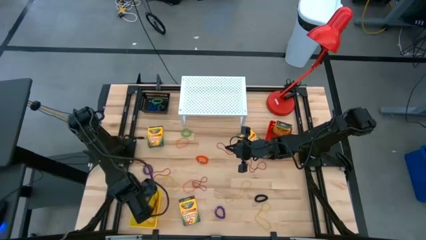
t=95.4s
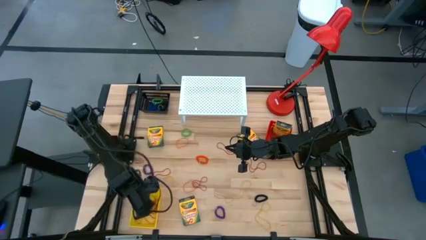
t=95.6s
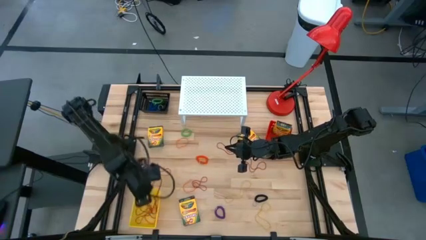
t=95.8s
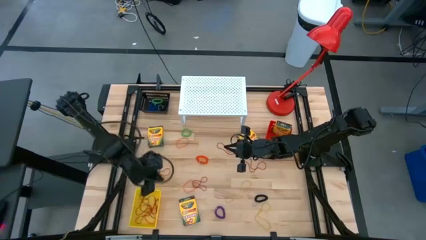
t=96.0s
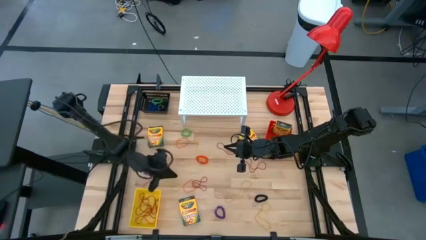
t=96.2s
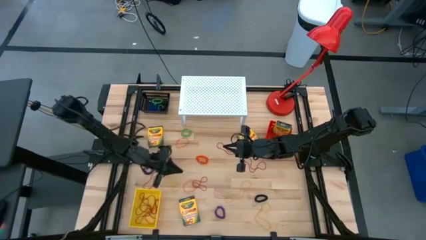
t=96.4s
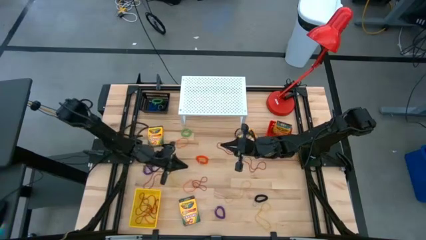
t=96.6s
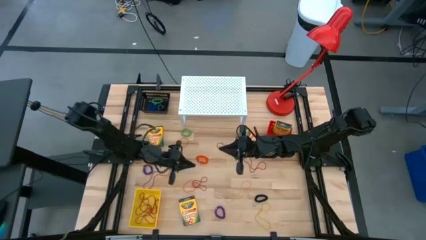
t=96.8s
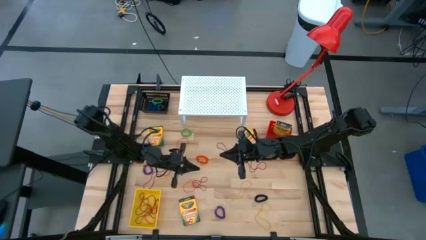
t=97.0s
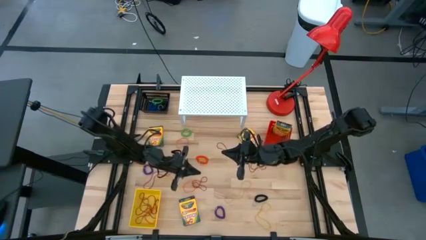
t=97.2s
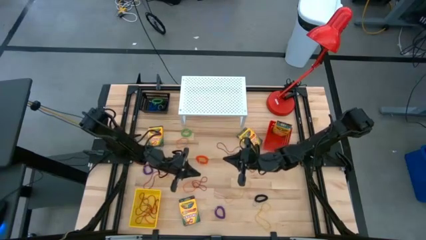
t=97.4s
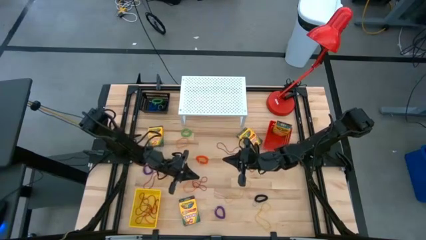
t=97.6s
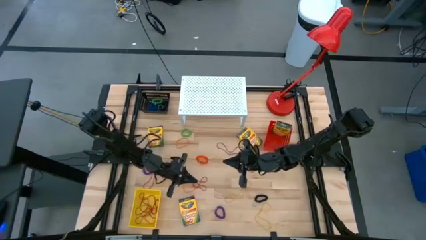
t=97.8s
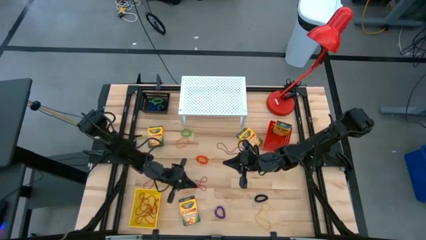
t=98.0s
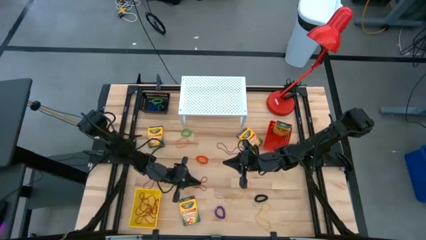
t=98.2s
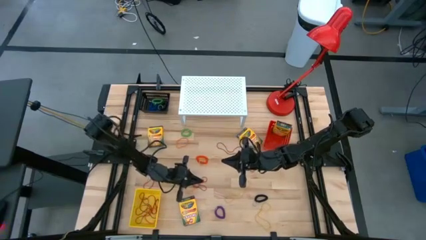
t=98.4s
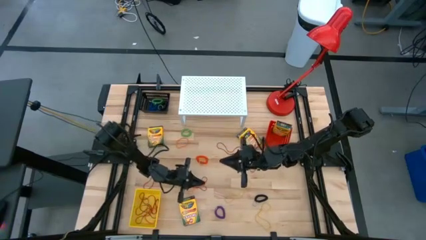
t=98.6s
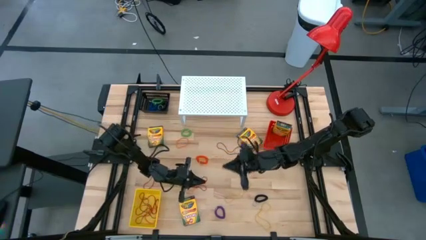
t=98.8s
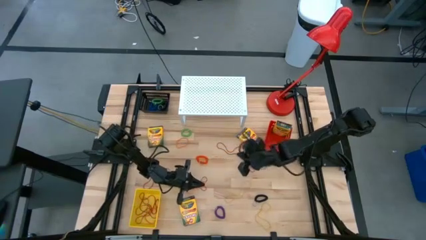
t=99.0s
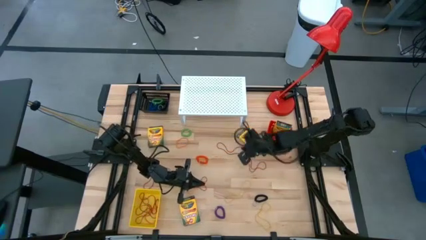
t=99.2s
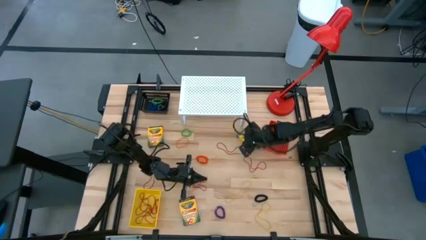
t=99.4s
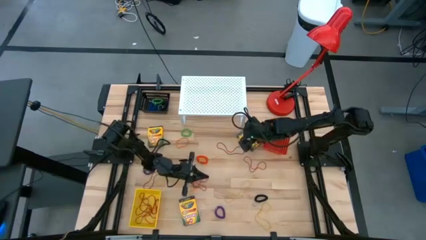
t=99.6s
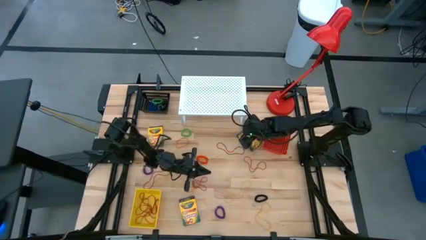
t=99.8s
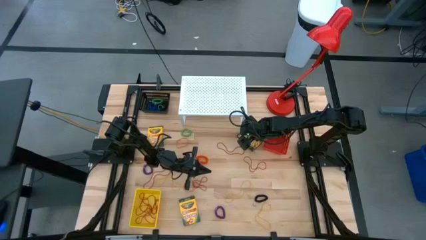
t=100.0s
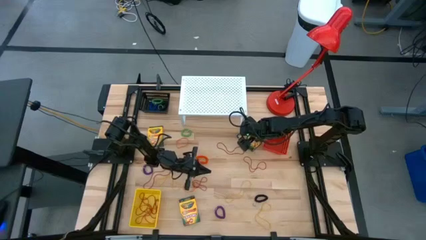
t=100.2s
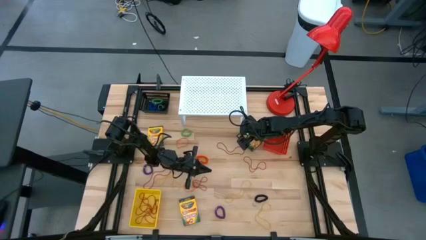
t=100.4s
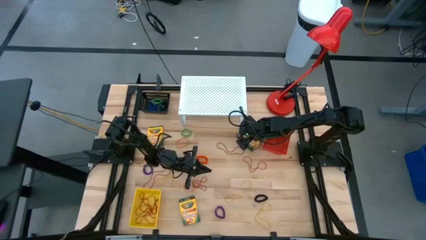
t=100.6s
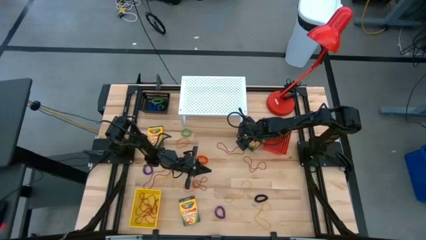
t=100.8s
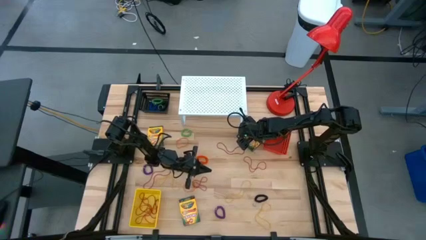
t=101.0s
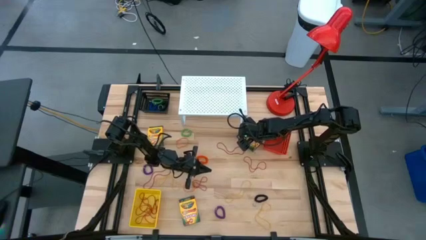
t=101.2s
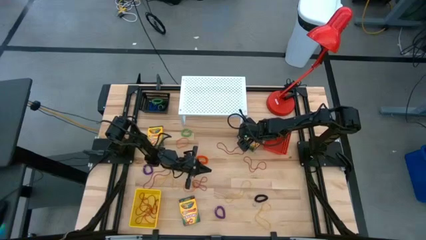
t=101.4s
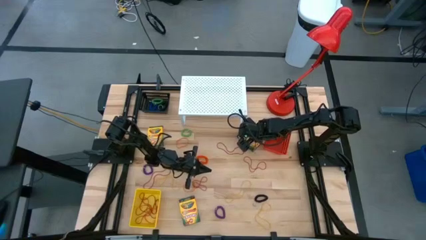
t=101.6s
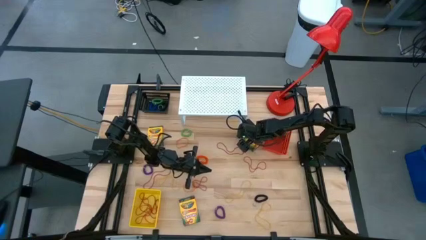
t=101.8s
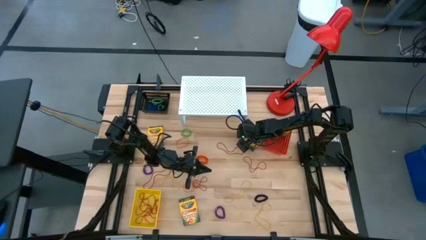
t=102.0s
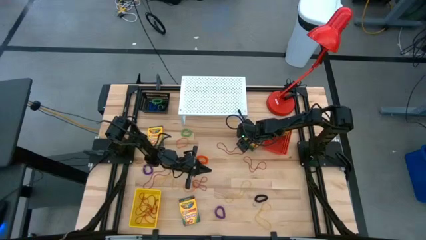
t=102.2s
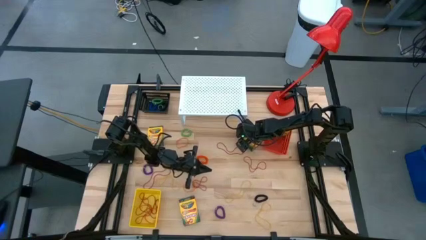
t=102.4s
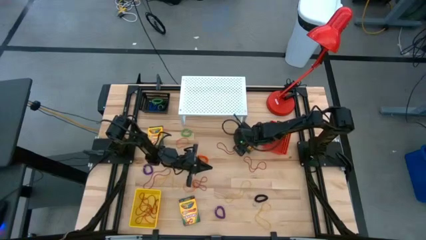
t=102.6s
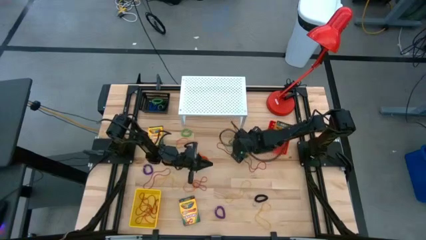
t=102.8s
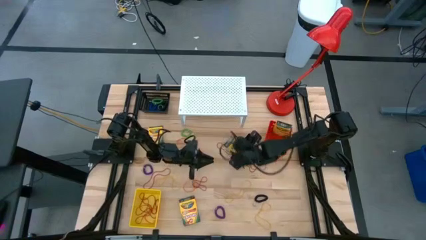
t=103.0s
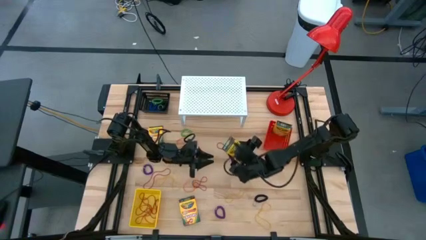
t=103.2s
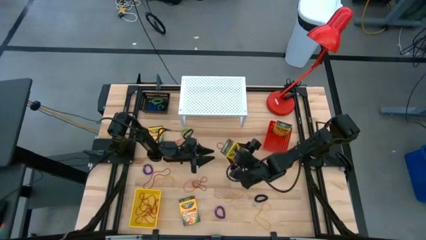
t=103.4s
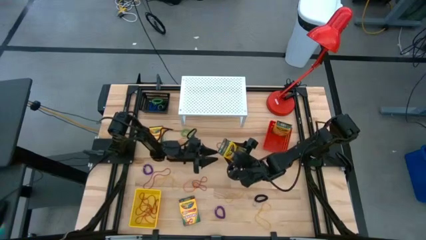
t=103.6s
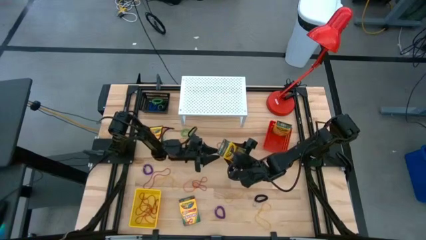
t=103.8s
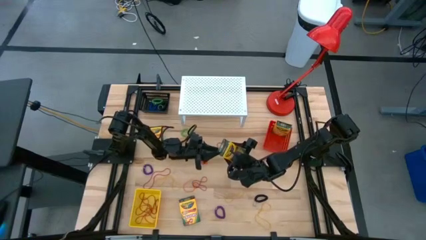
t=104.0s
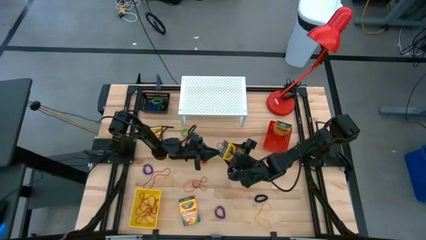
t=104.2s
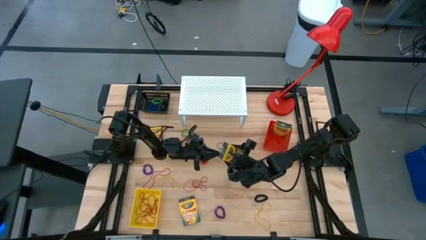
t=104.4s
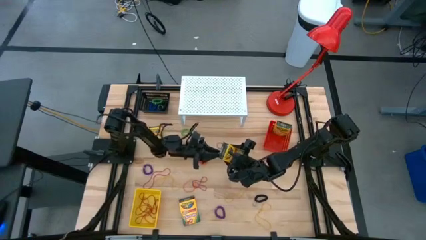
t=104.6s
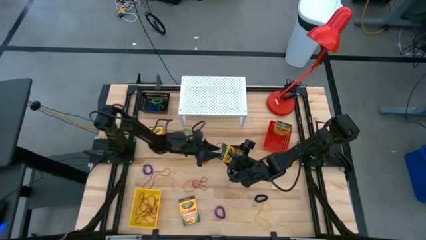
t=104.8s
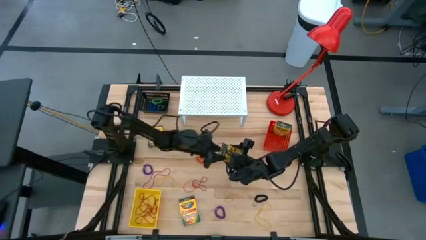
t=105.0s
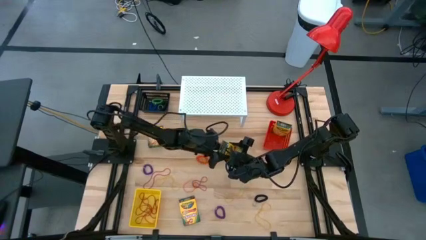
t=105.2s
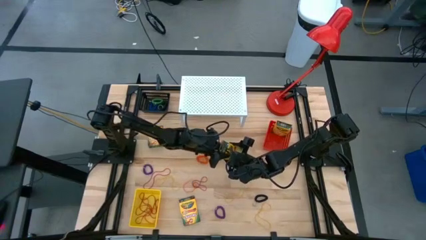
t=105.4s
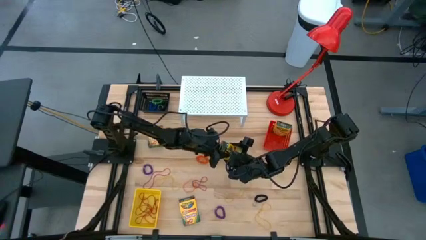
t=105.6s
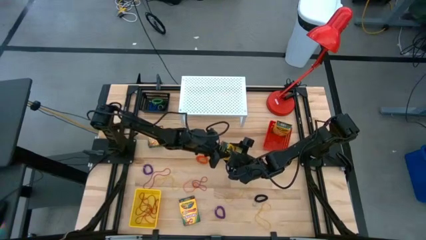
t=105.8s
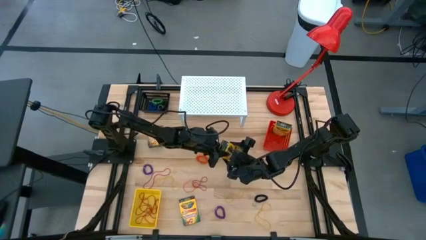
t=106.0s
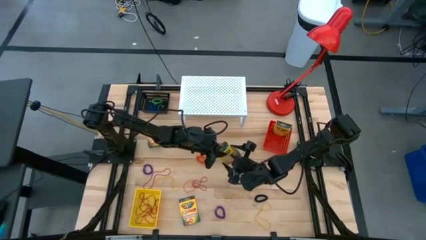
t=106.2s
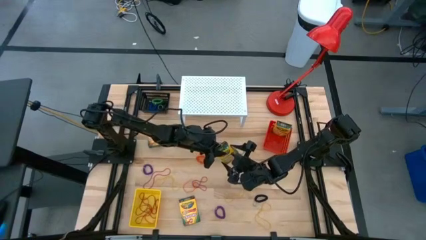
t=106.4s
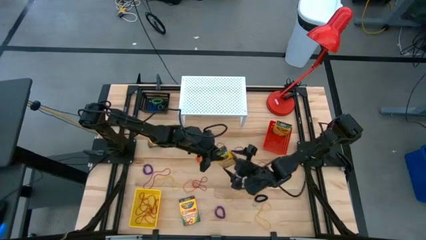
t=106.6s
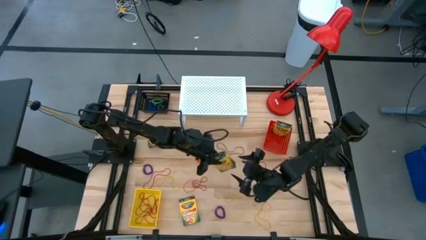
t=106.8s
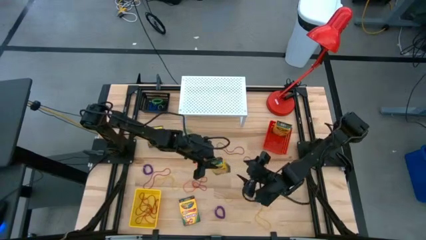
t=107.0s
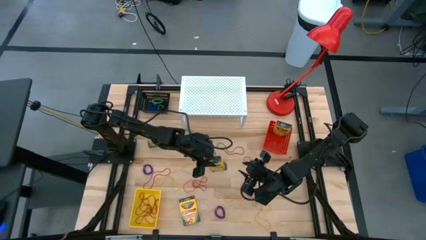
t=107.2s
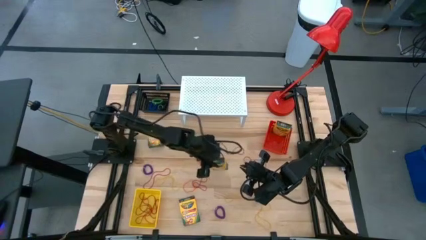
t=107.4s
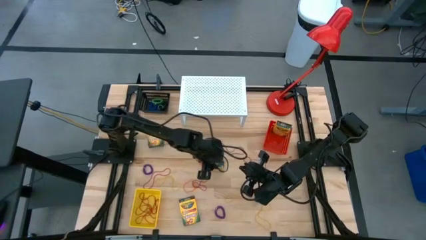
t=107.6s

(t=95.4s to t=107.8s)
Task: Pick & Place Office Desk Supplies
Put the box yellow crayon into the red bin

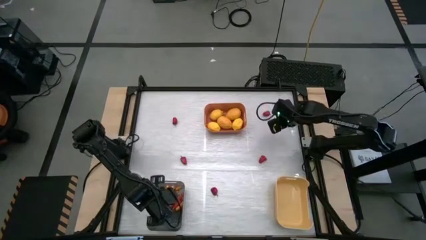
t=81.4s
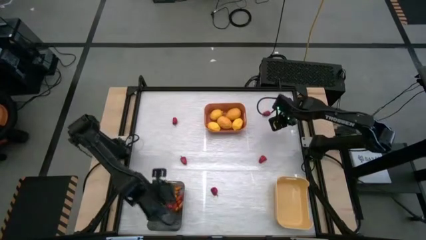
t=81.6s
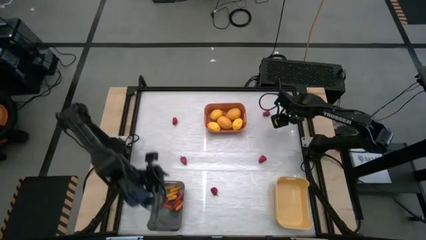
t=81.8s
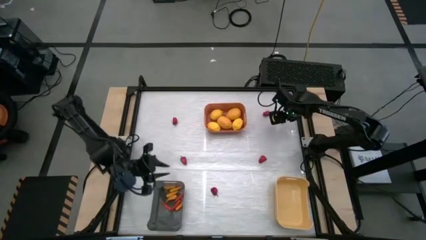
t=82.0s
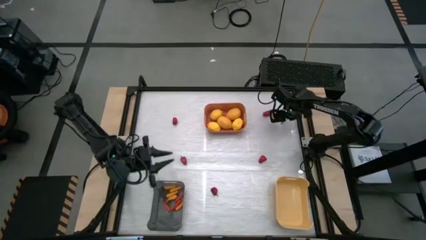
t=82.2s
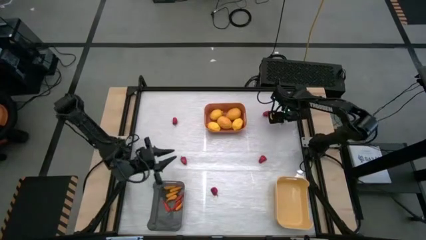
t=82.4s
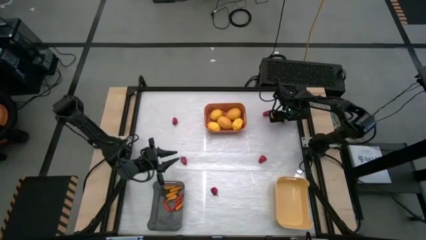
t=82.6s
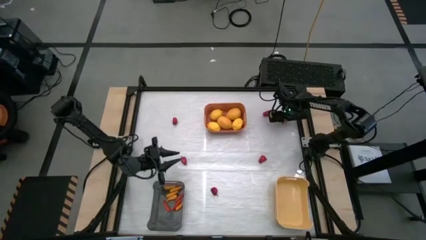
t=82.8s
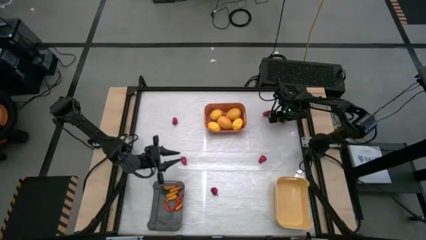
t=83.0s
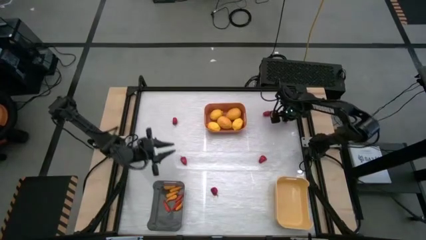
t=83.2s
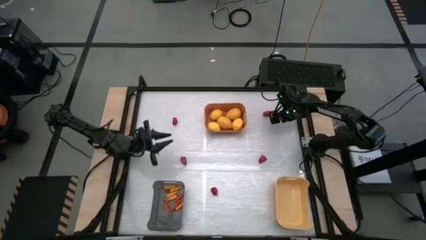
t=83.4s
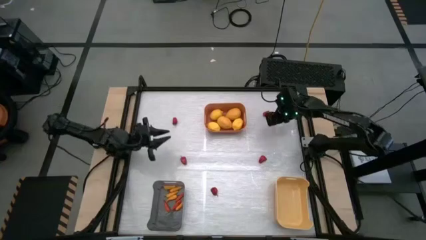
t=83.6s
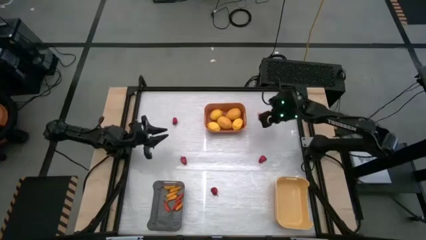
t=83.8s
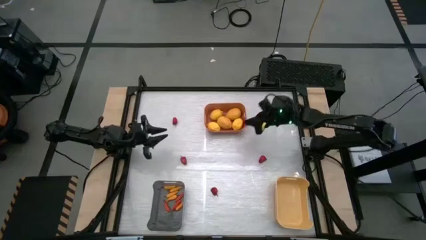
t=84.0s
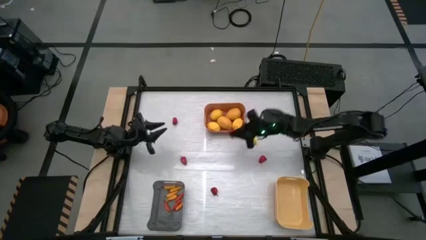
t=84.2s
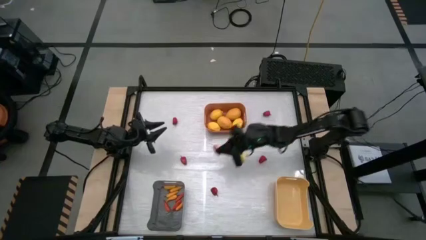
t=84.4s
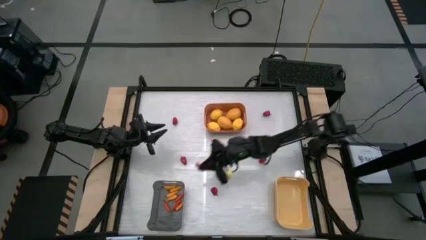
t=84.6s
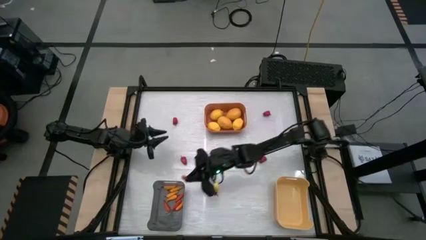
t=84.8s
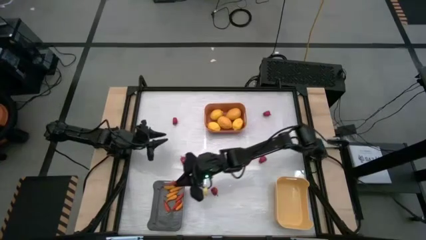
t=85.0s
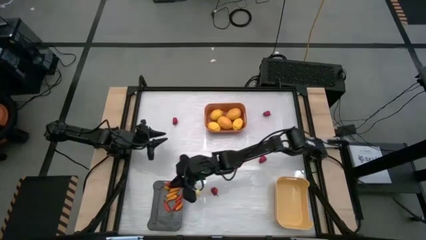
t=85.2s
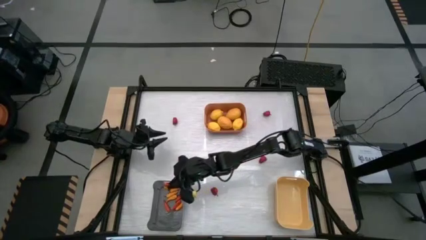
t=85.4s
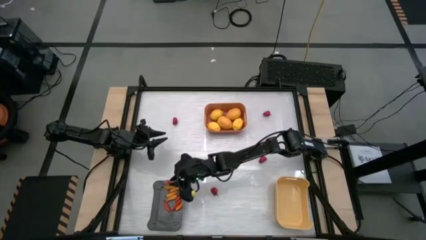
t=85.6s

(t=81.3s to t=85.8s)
Task: Sort produce into baskets
Put the orange chili pepper into the black bin

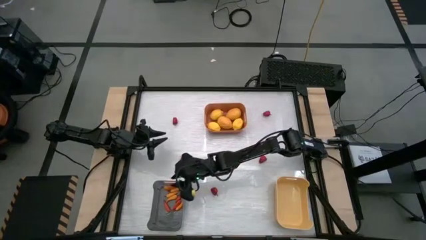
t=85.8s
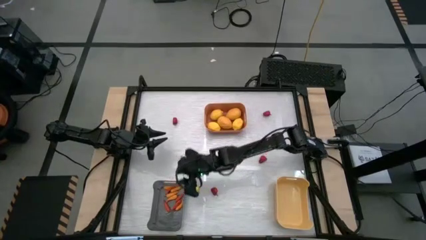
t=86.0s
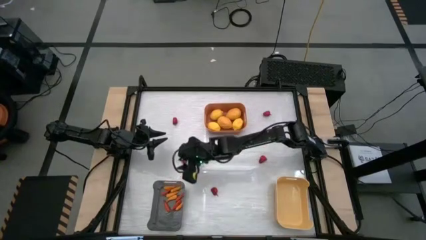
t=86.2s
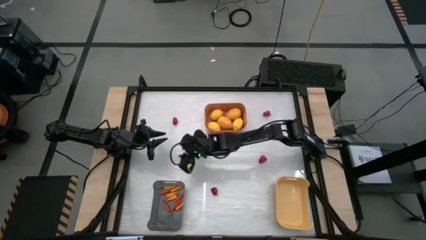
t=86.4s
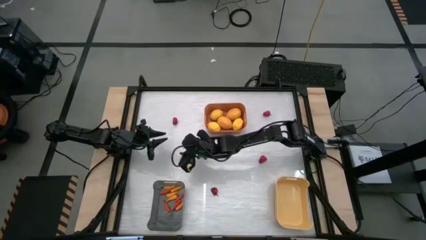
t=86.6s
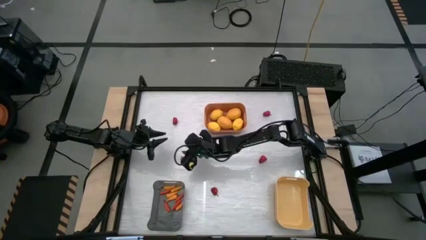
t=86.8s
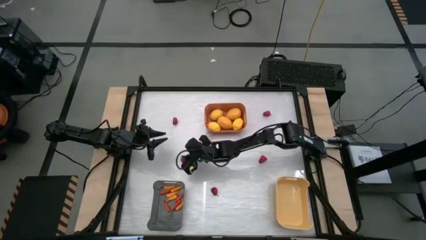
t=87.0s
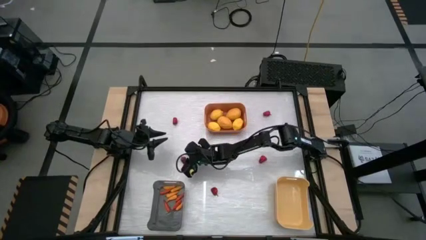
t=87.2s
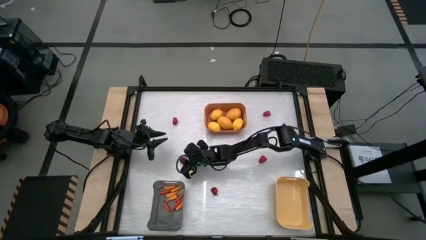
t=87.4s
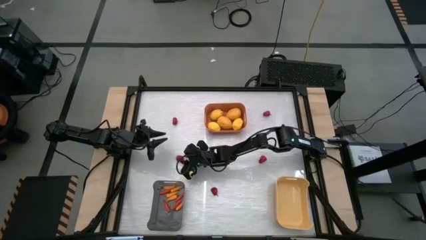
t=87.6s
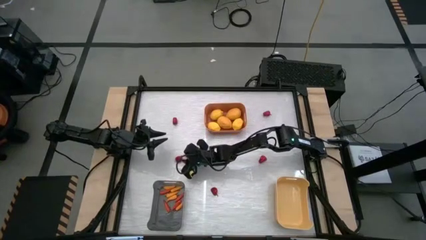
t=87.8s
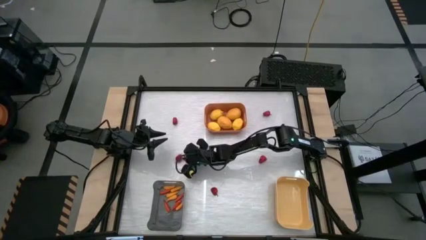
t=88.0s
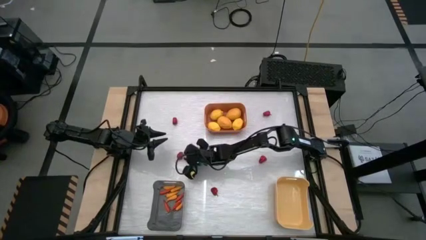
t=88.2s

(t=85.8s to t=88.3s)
Put the red chili pepper into the yellow bin
